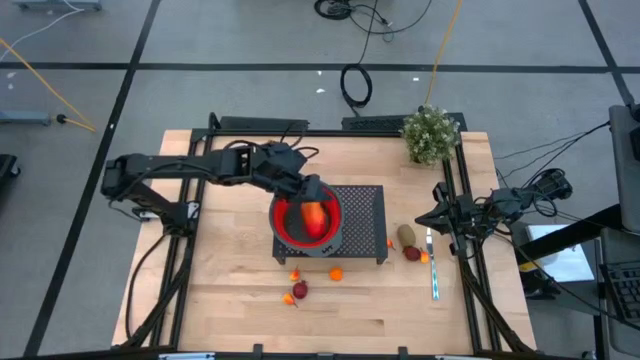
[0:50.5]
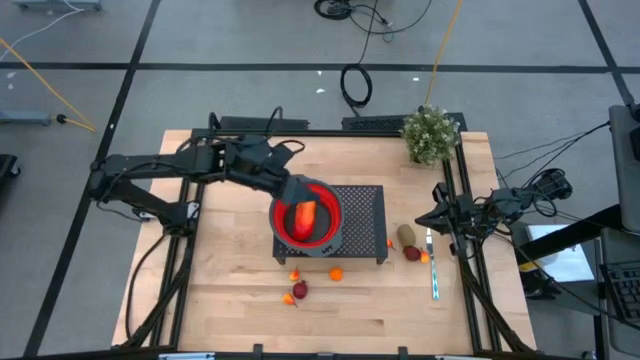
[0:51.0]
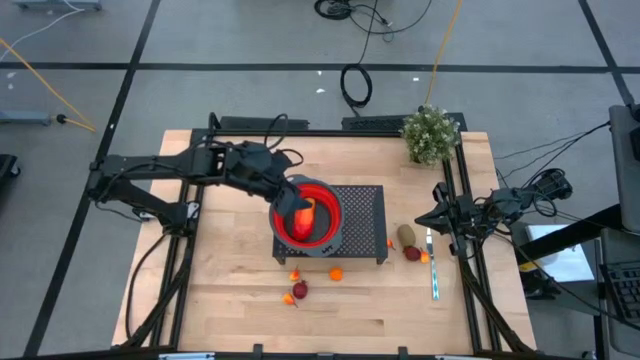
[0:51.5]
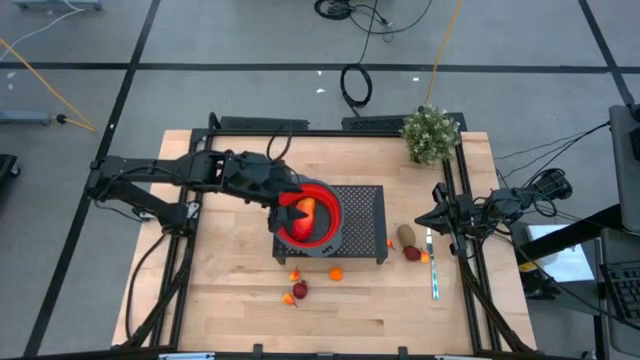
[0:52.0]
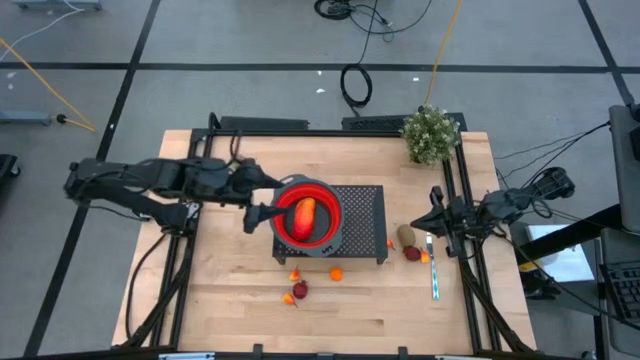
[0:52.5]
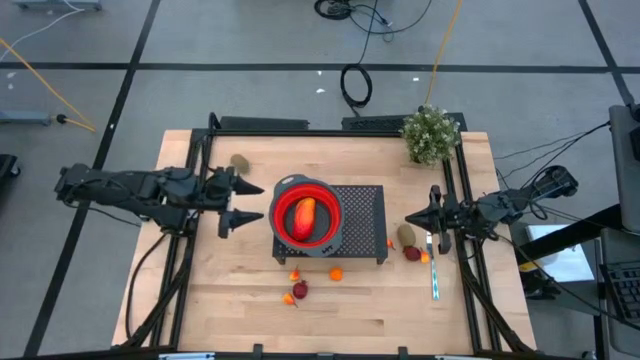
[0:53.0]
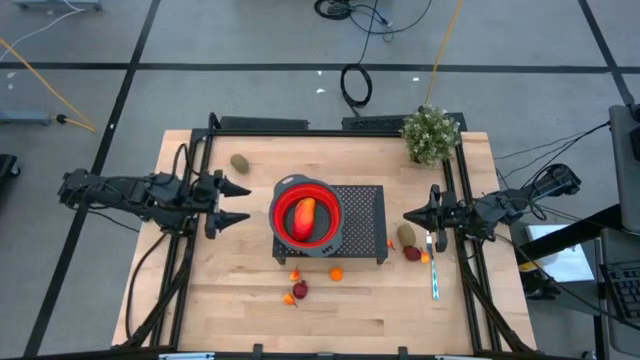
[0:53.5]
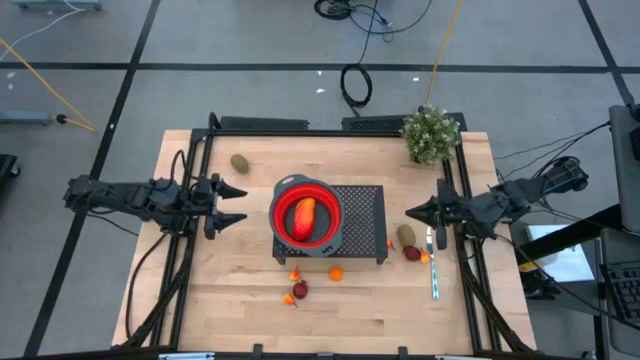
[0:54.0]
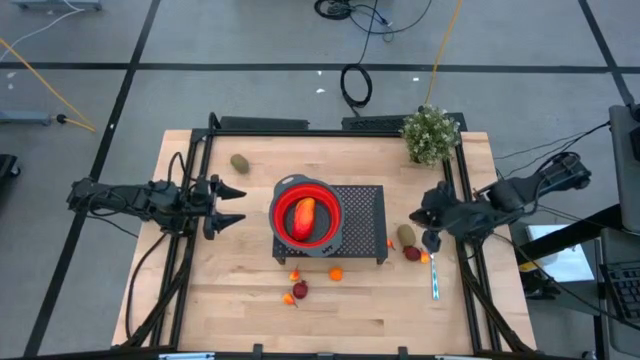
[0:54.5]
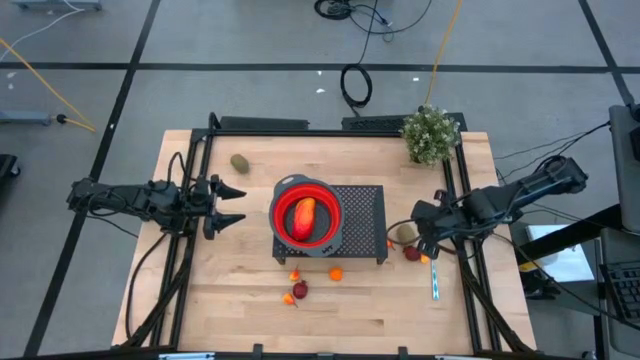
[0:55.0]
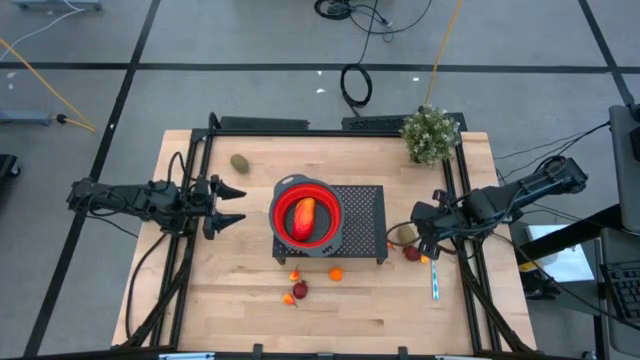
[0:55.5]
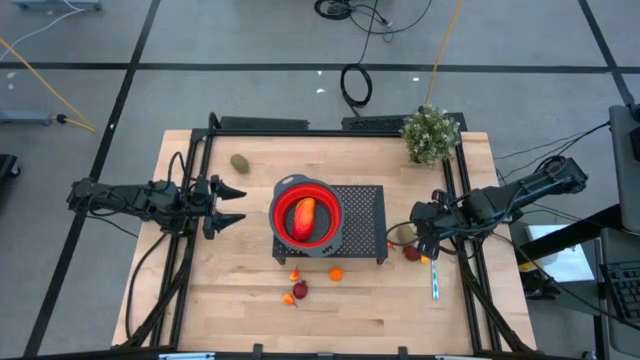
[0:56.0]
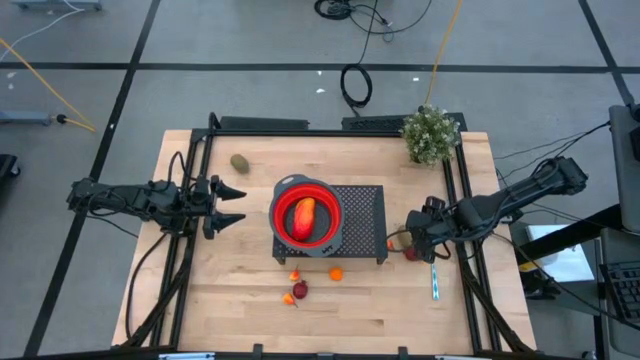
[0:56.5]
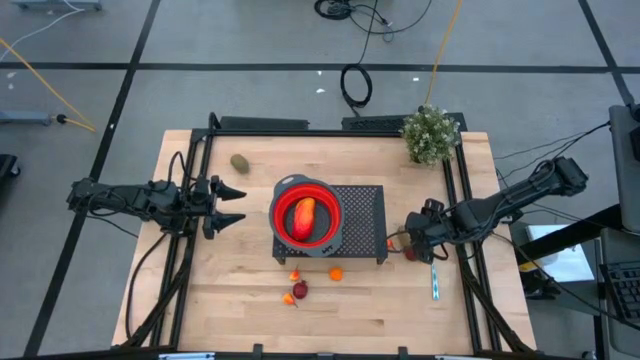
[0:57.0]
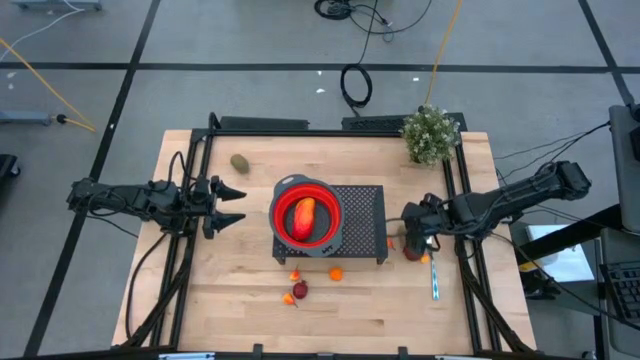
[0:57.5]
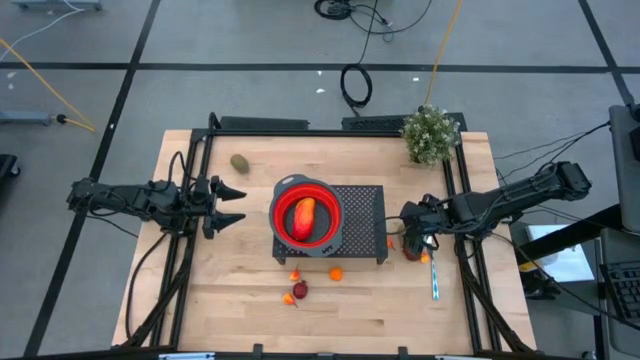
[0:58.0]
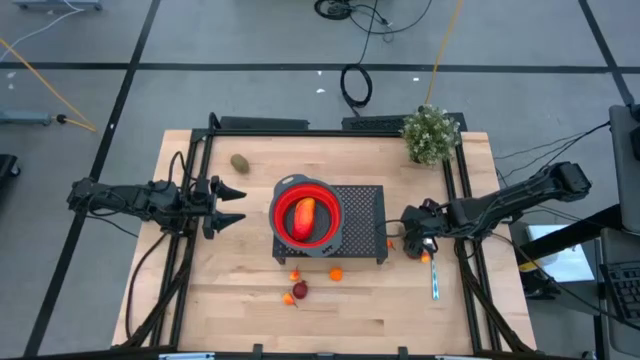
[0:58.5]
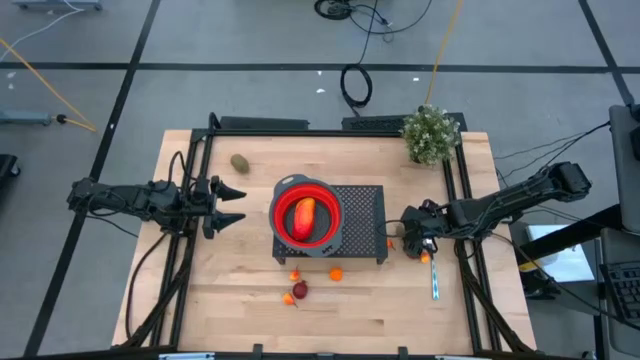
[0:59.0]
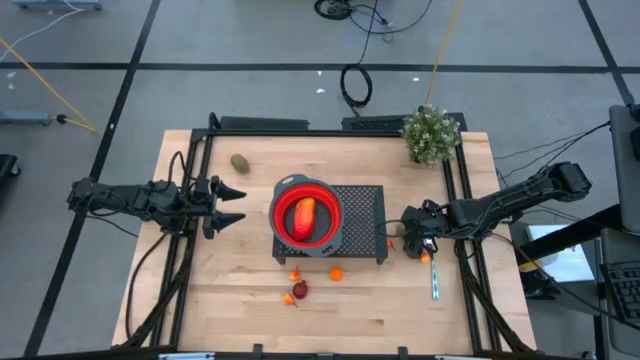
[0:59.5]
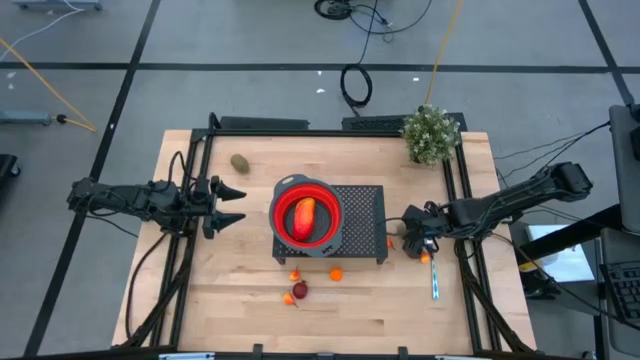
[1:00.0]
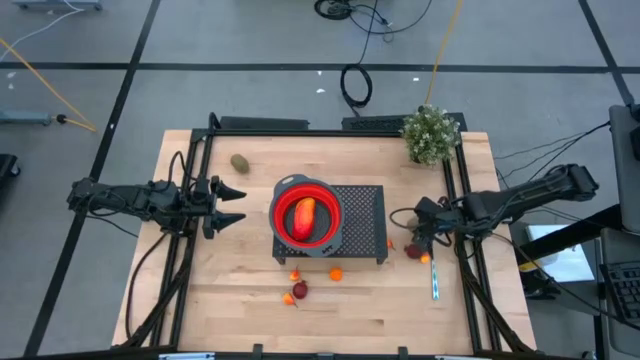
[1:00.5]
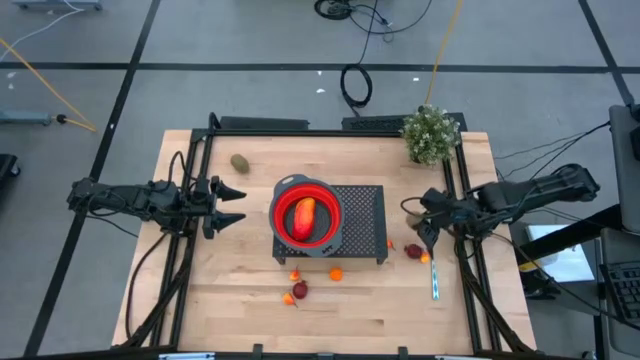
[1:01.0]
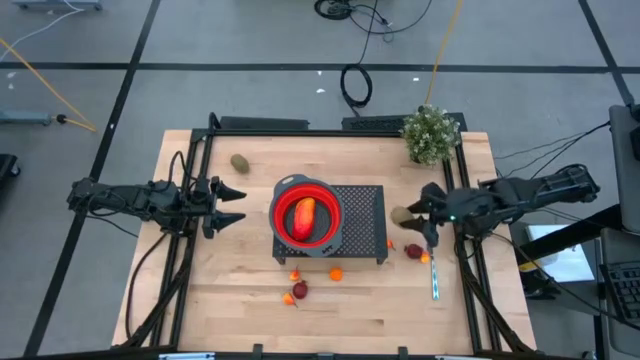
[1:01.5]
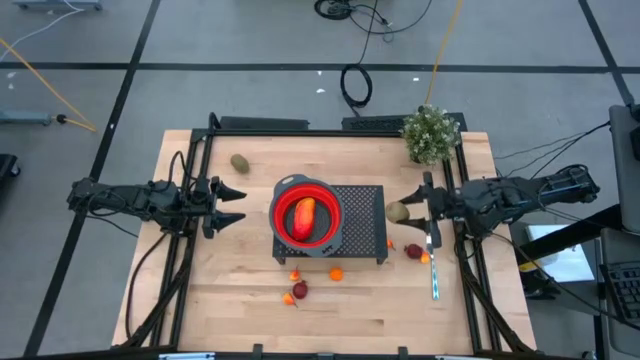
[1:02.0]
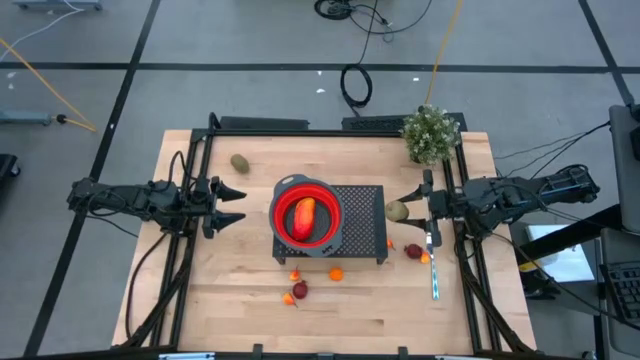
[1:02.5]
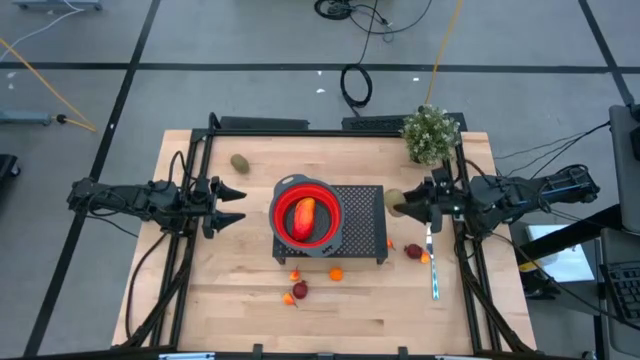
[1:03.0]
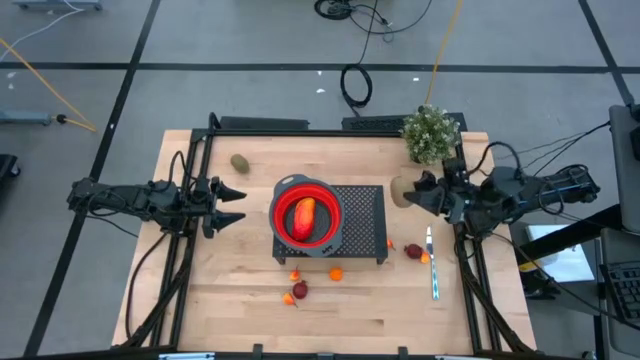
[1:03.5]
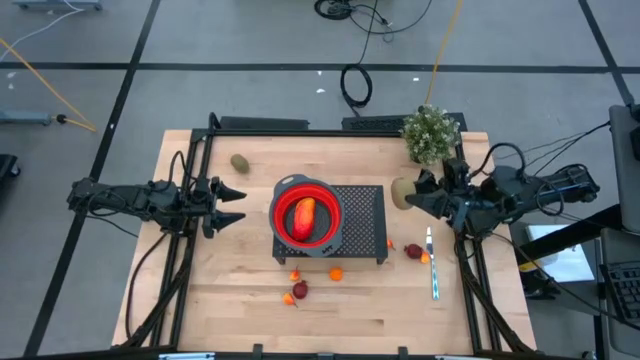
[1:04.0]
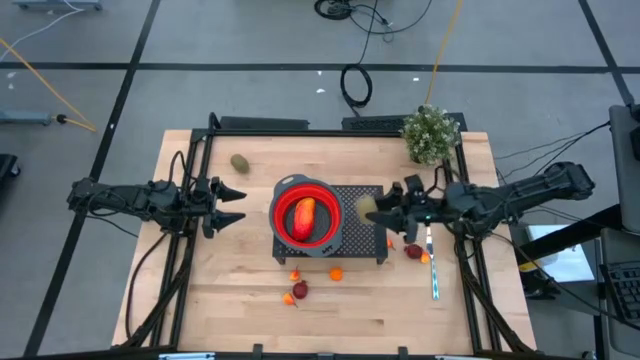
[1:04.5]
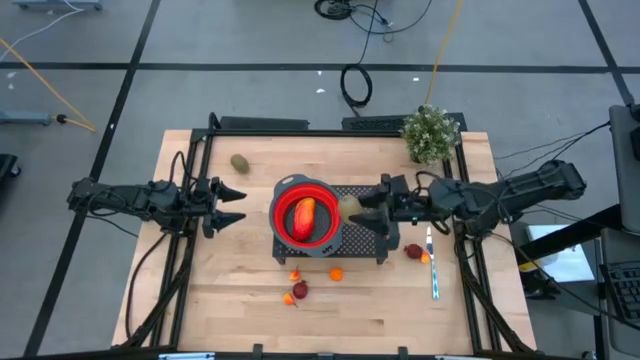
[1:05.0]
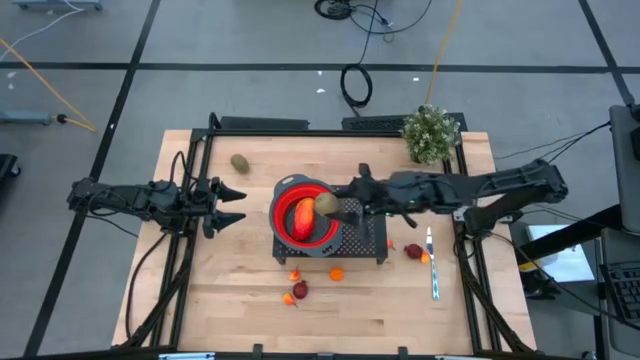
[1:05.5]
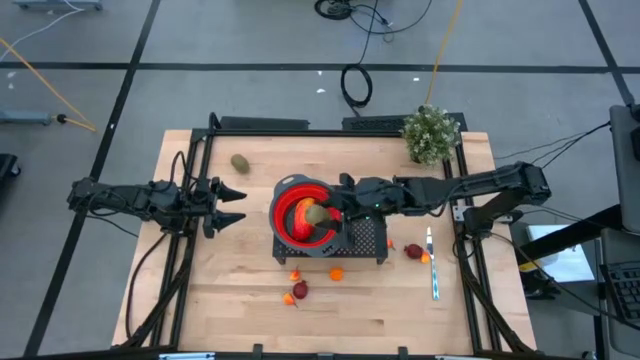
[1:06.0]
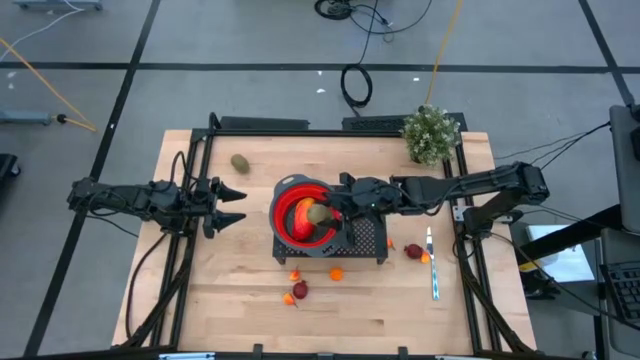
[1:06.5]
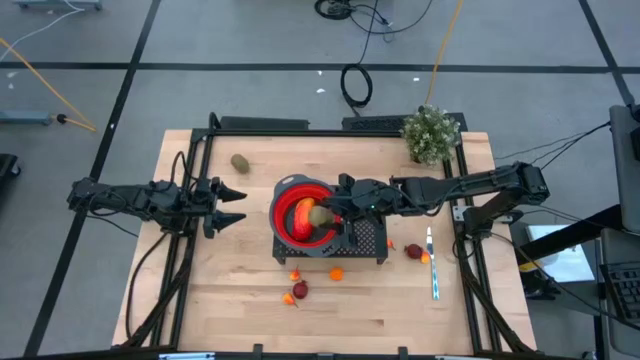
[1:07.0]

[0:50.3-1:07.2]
Task: Pick & Place Fruit
Put the kiwi into the red colander on the shelf

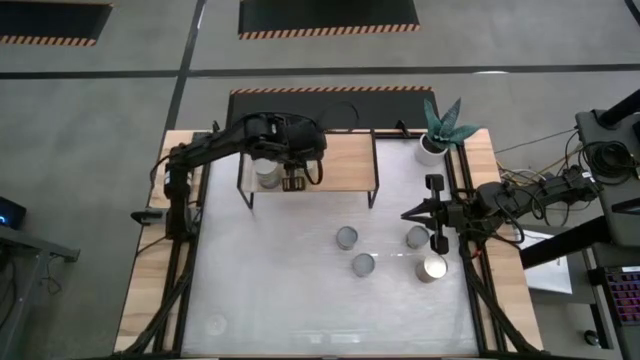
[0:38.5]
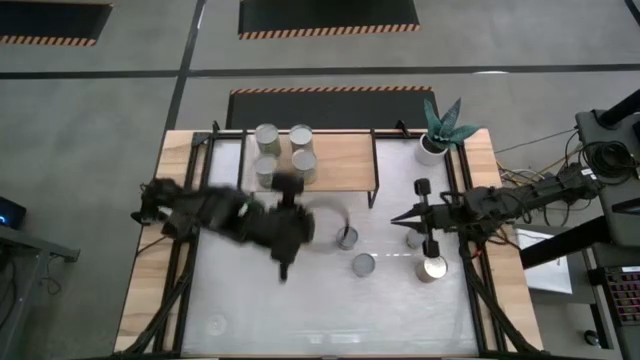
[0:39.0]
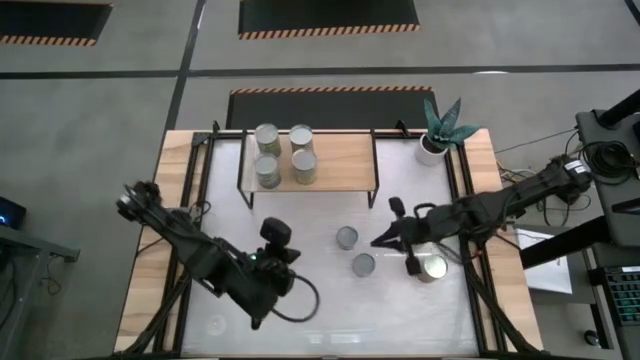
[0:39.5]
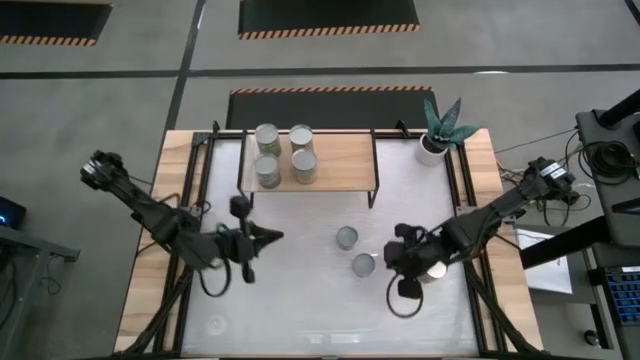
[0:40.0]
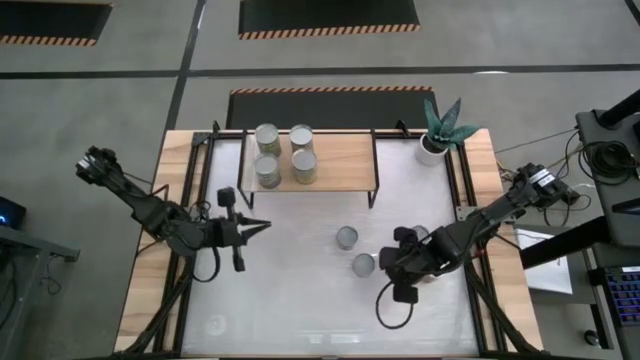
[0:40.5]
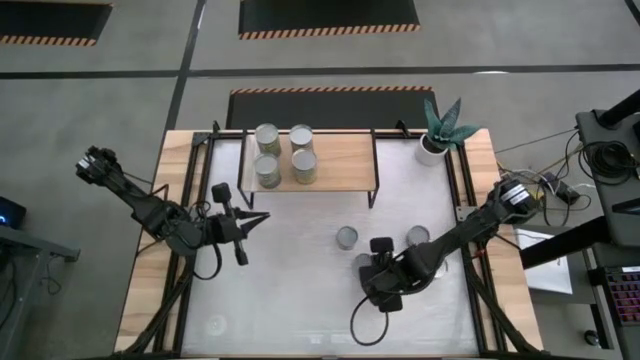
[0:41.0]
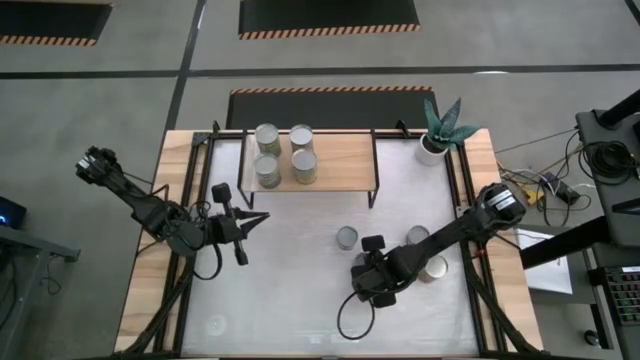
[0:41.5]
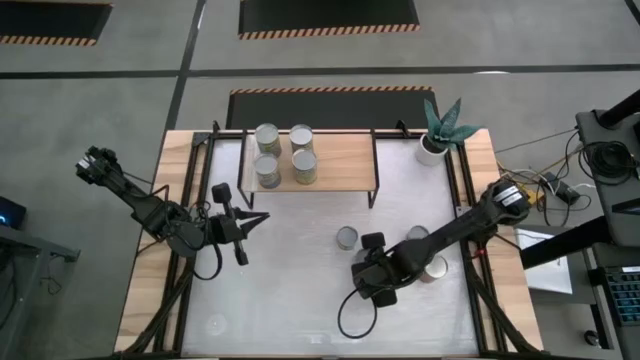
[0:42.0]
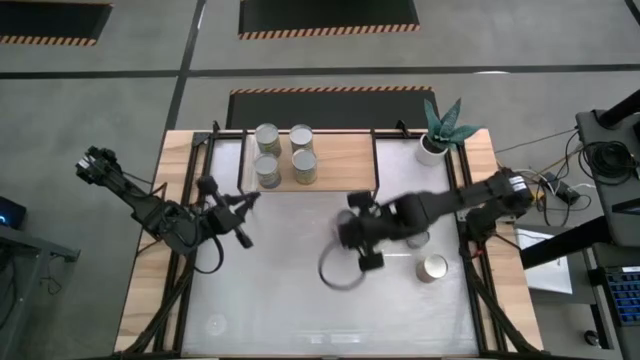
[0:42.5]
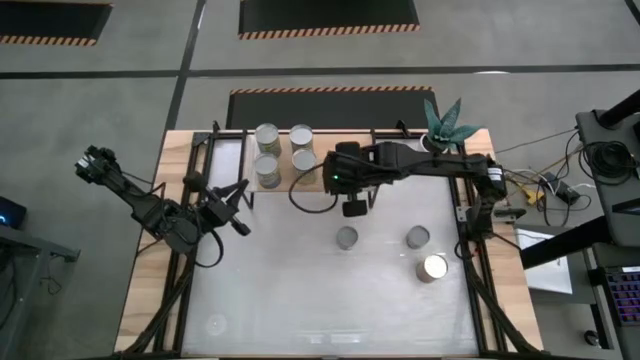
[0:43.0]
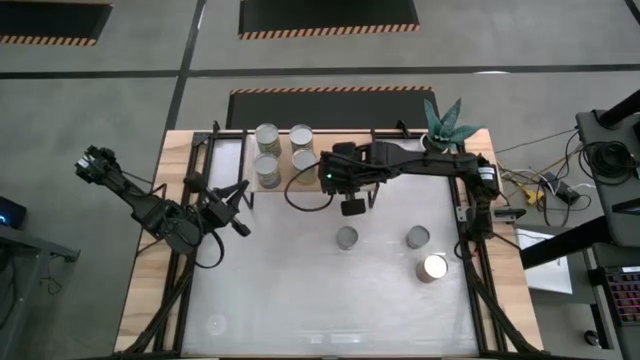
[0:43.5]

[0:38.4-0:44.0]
Task: Pick and place cans onto a shelf
Put the canned meatballs on the shelf
